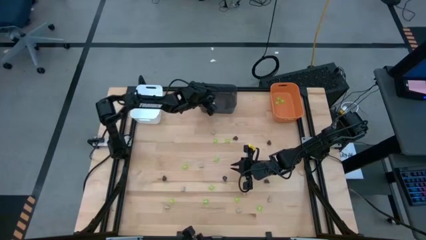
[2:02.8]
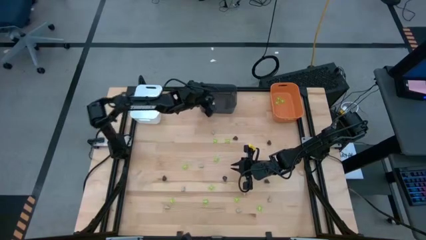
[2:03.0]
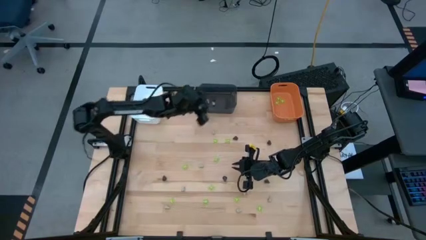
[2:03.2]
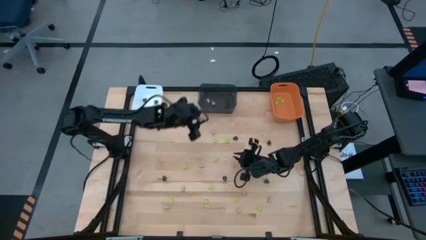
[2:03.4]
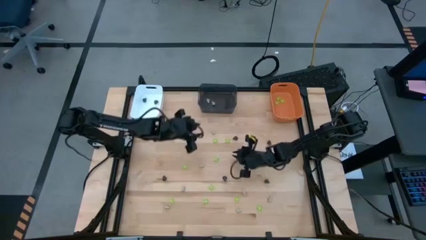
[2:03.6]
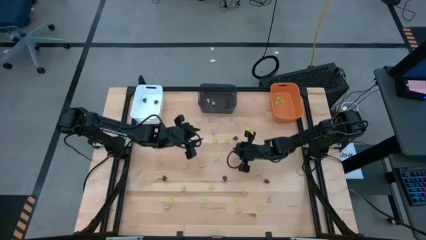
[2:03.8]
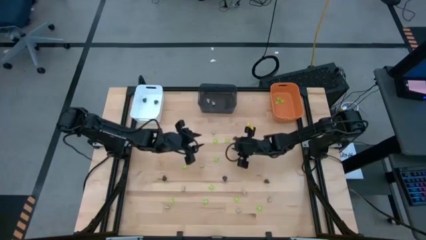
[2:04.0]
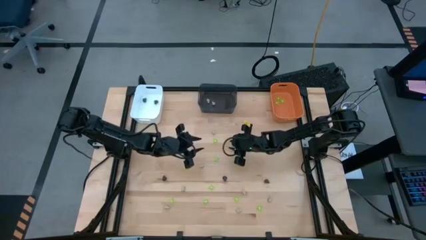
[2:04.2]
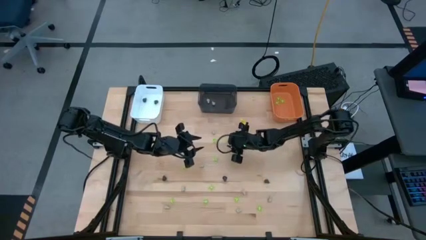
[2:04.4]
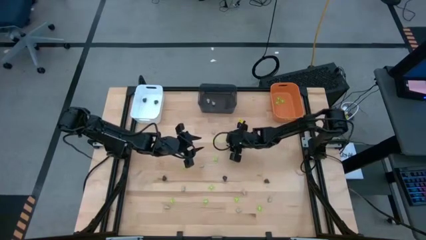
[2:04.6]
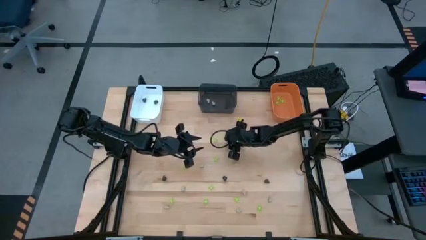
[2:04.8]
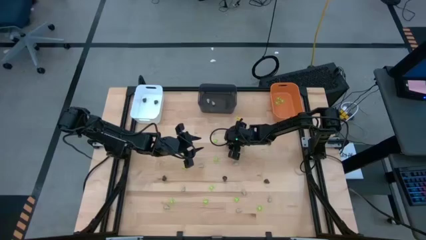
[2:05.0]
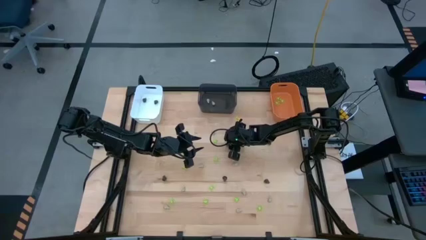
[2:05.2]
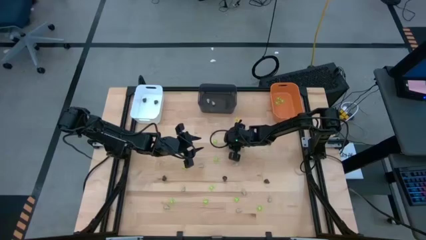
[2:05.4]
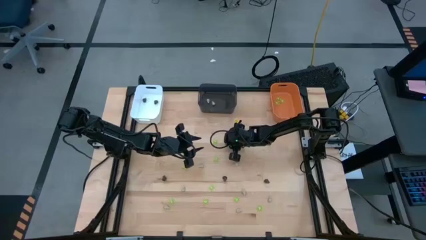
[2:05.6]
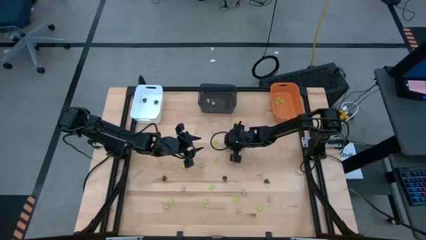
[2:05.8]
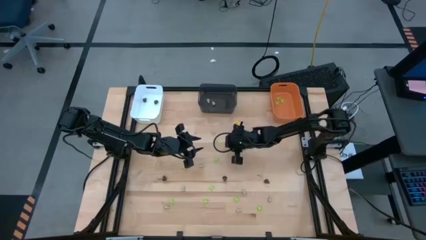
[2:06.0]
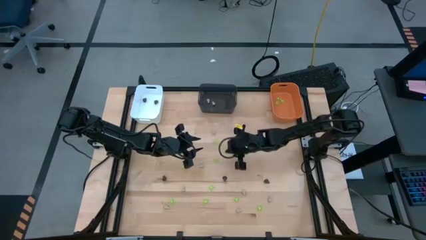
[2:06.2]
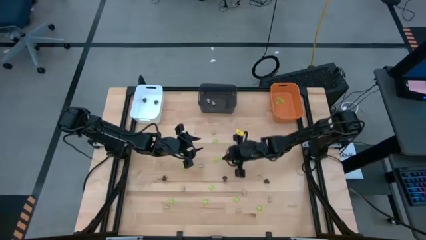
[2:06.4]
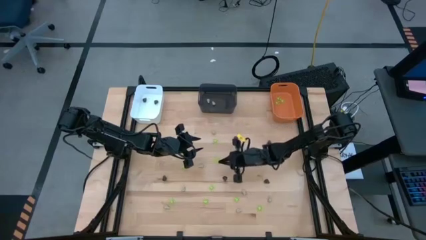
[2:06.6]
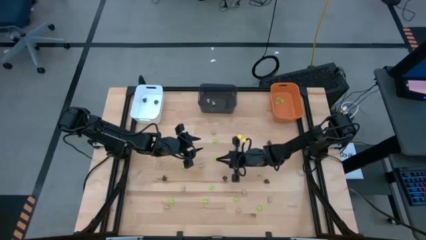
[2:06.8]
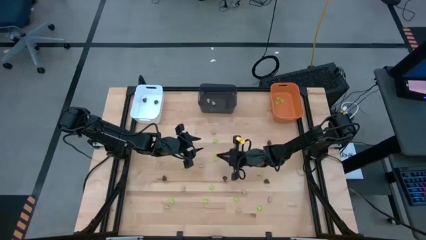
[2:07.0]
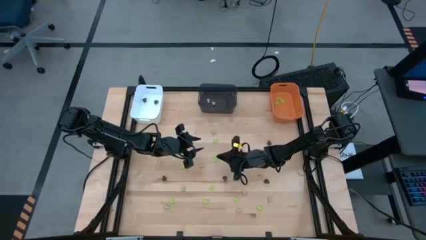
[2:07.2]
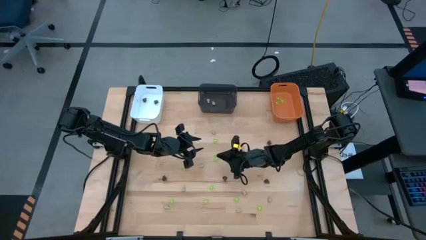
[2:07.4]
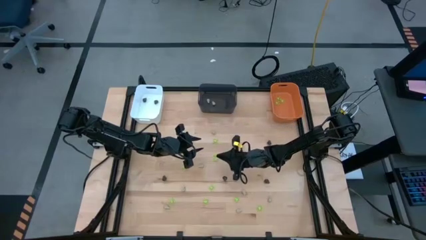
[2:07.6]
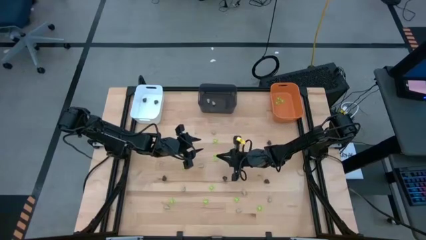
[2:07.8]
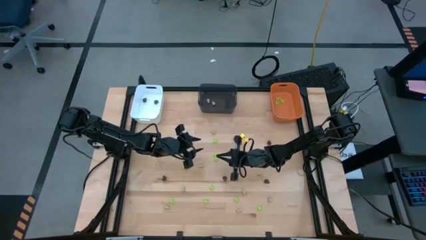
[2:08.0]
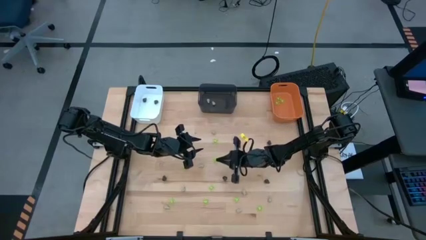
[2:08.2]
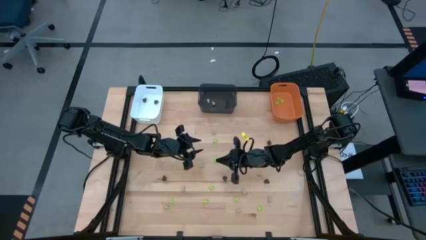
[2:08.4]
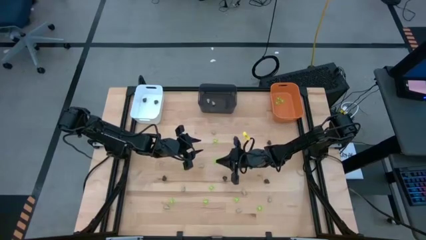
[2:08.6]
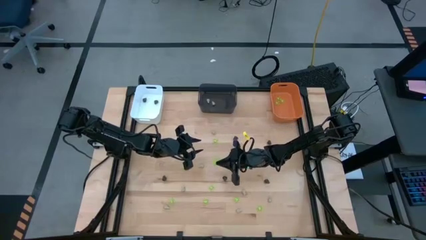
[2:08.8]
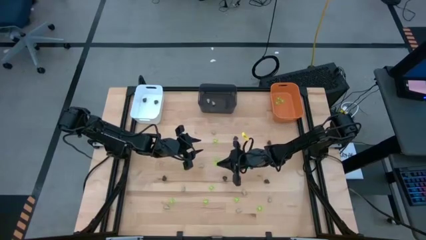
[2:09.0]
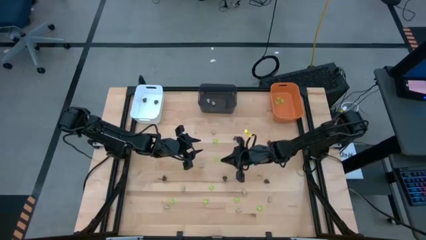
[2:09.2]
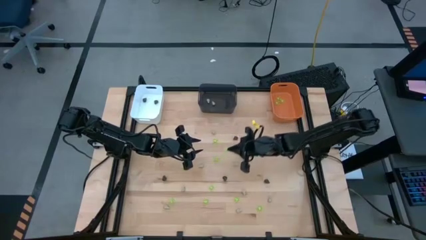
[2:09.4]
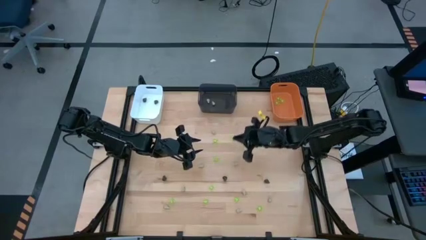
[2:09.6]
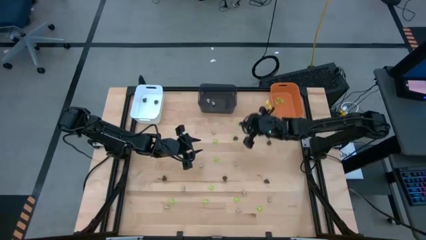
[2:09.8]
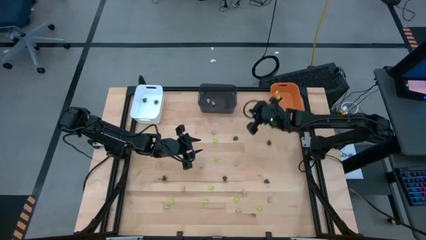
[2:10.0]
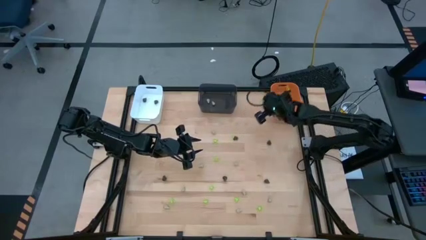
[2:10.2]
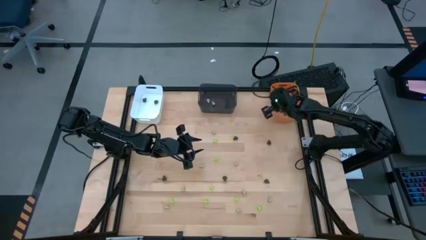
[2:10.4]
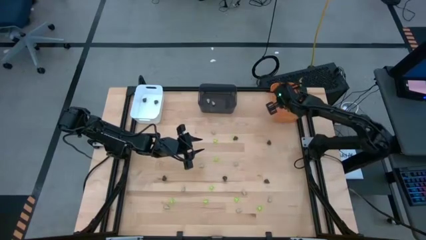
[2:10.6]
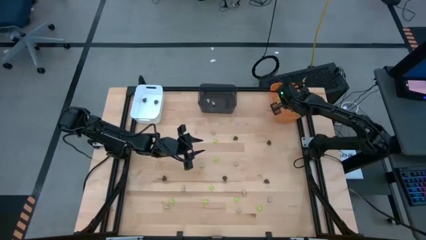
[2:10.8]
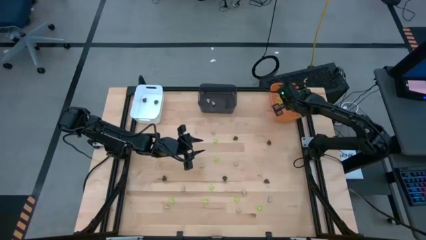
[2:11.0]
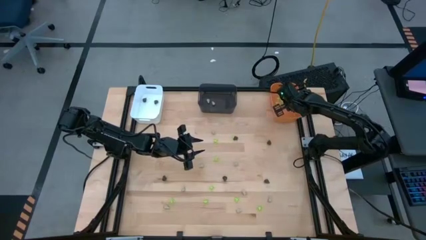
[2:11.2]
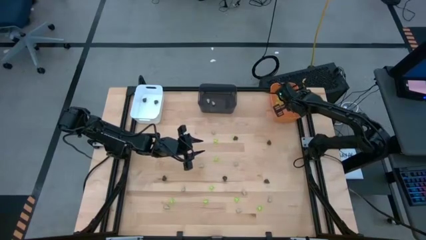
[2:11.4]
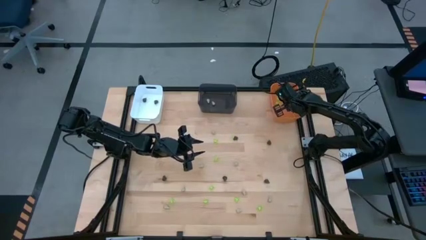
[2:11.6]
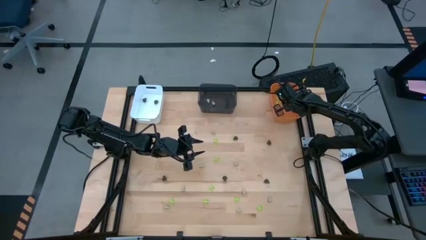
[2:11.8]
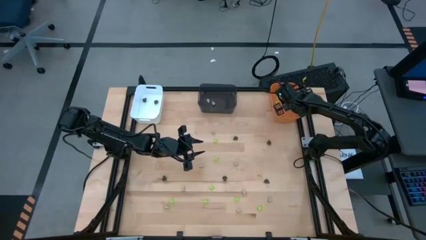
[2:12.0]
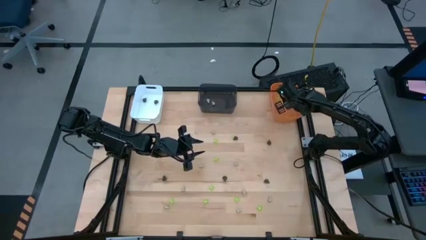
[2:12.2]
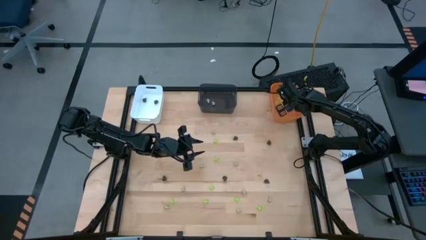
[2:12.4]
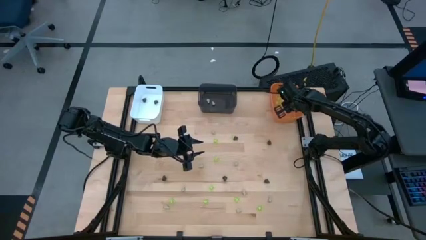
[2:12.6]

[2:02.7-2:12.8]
Task: Sort Halloween decoration
Put the green toy spider into the orange bin

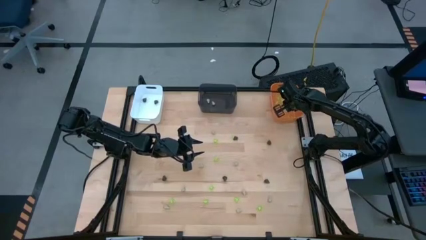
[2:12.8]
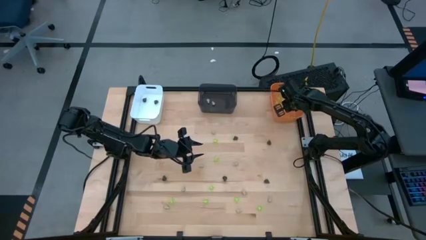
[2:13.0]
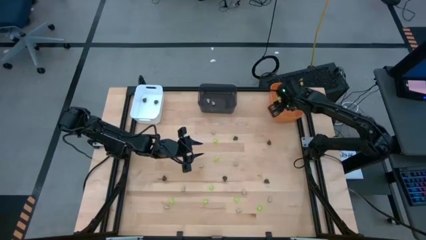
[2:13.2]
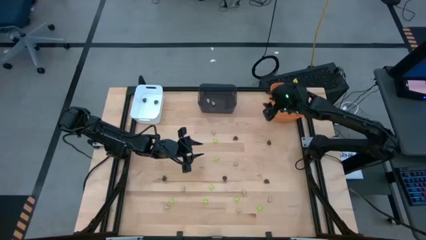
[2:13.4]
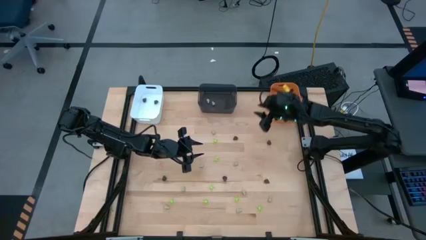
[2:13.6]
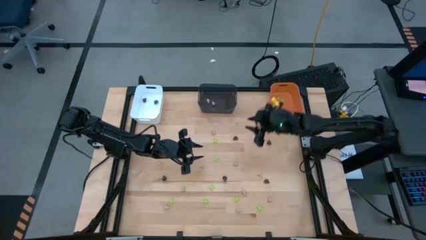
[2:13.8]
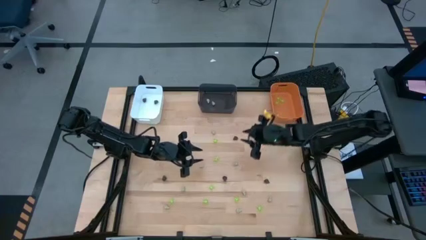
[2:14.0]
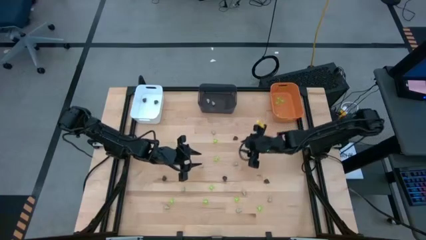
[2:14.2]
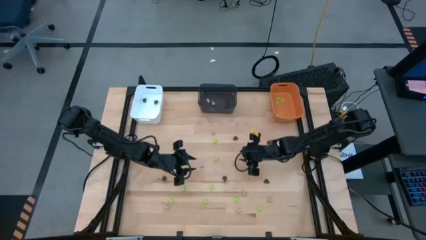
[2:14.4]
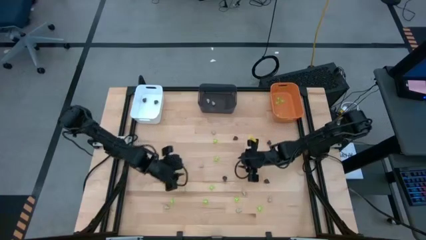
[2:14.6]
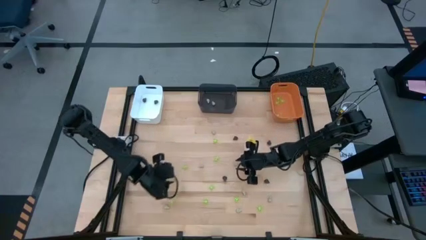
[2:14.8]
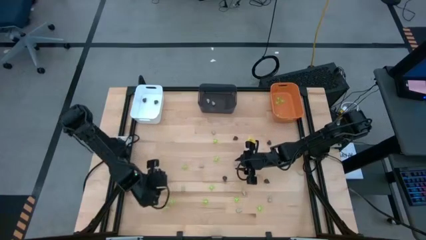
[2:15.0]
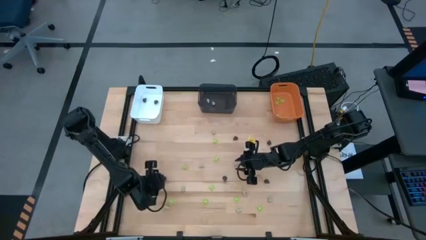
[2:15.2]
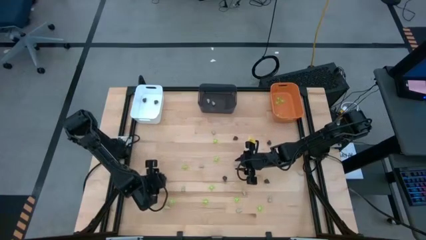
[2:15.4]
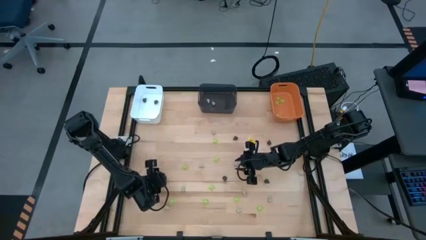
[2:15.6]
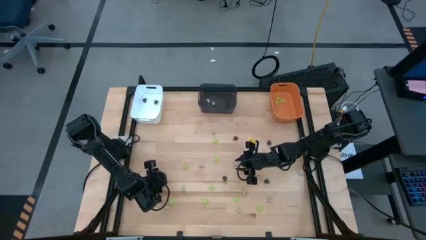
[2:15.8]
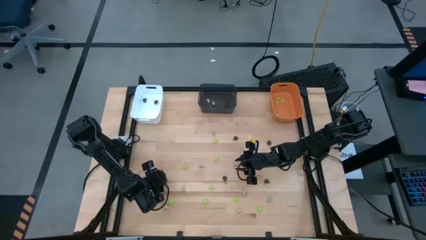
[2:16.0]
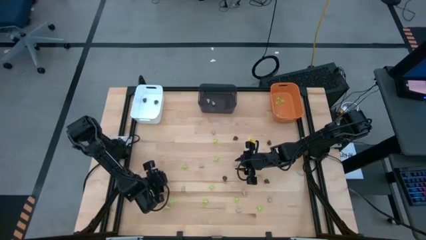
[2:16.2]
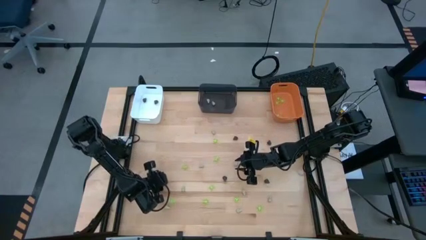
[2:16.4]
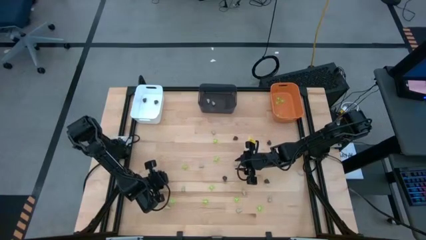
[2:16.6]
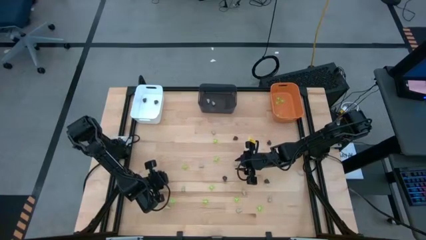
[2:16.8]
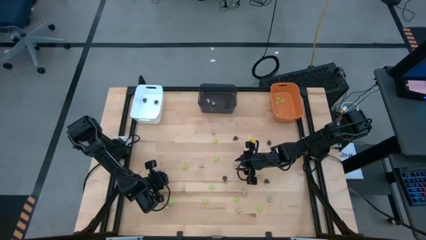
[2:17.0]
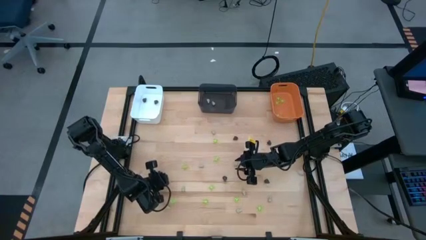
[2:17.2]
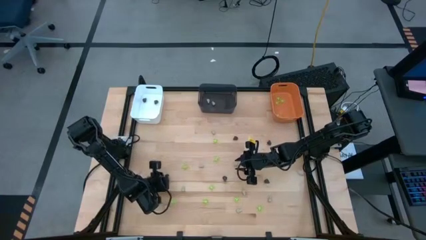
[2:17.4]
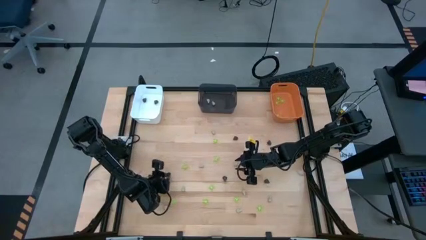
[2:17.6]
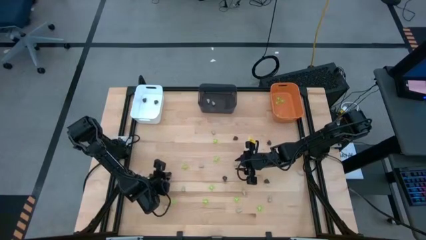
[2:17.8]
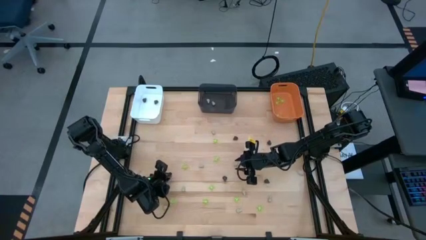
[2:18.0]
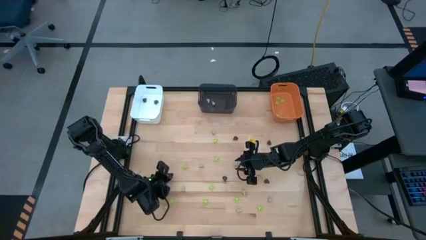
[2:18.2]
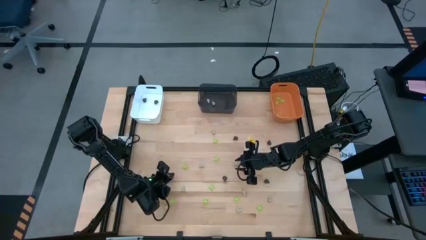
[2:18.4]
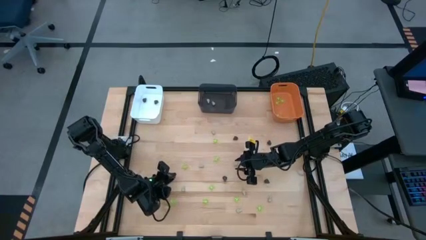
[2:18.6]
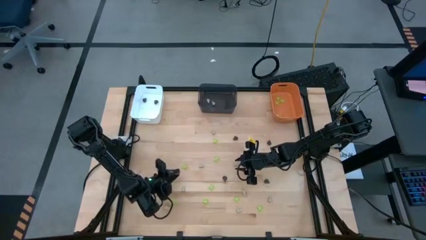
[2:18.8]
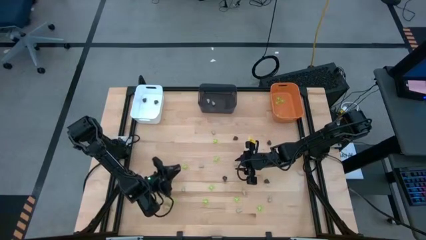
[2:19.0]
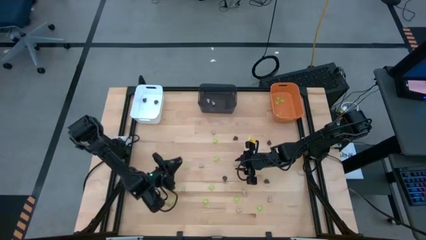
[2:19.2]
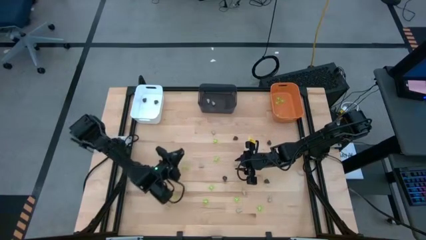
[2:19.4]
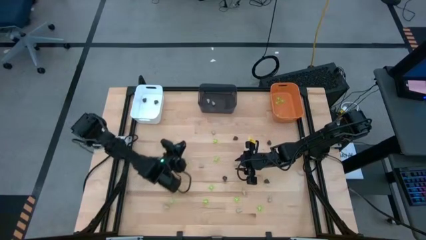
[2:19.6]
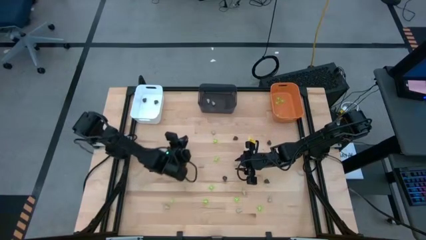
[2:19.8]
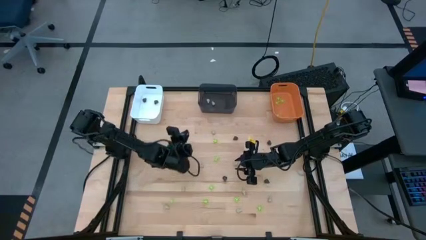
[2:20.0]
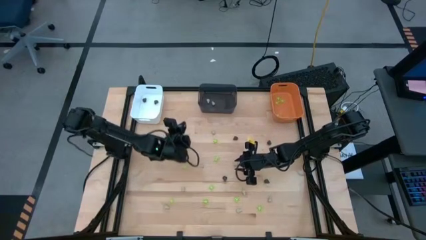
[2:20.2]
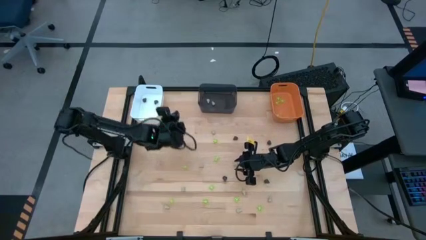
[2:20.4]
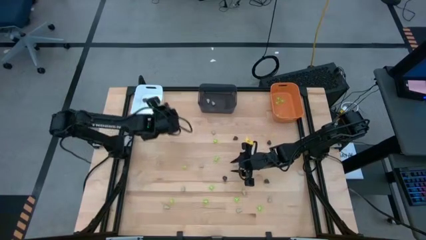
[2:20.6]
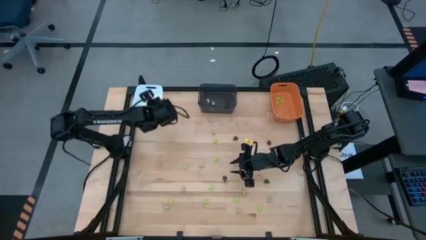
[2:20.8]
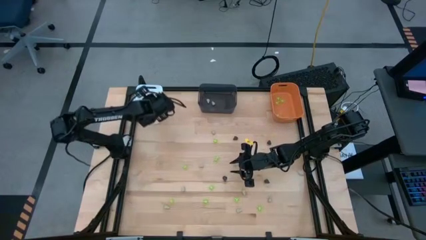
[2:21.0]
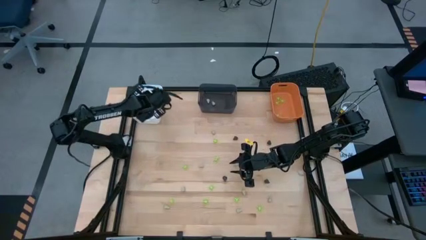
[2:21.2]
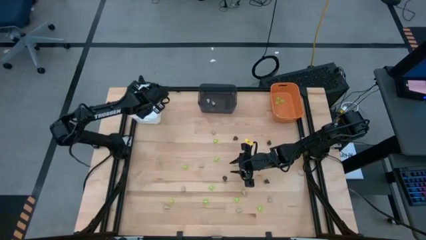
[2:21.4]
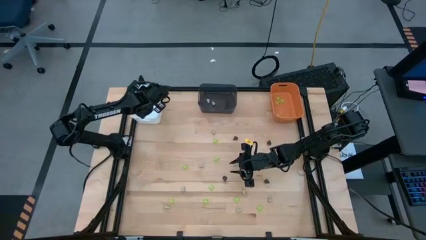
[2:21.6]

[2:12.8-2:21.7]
Put the black toy skull into the white bin
